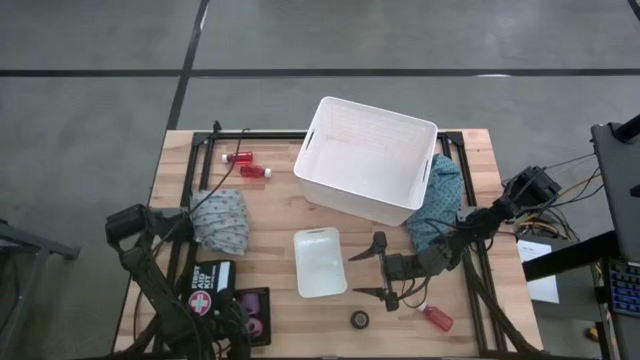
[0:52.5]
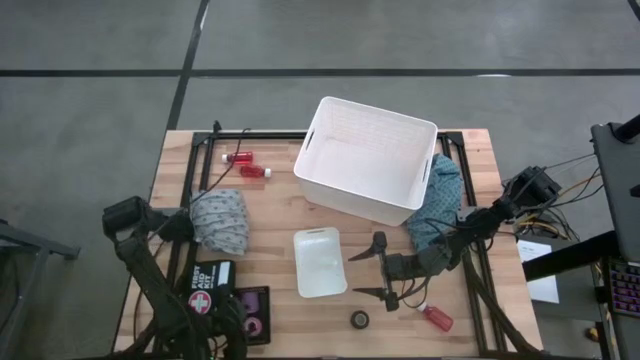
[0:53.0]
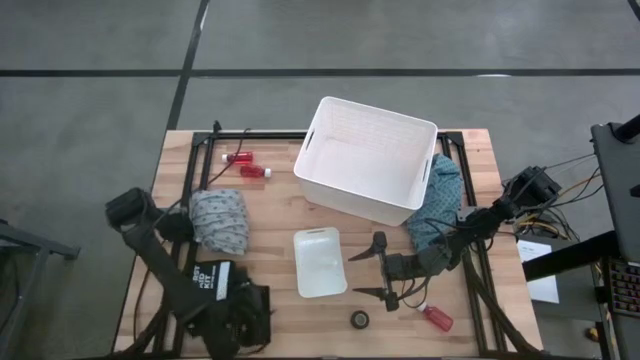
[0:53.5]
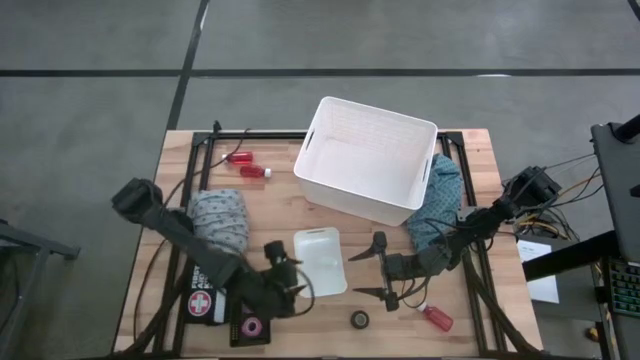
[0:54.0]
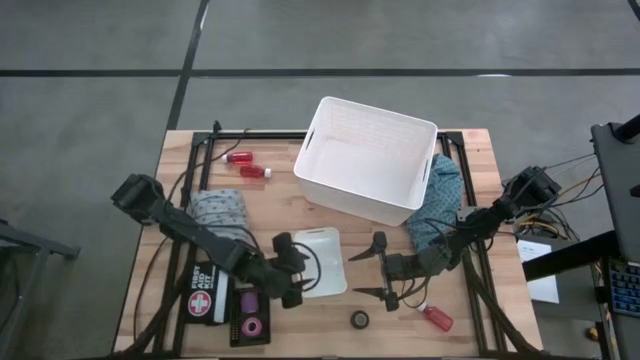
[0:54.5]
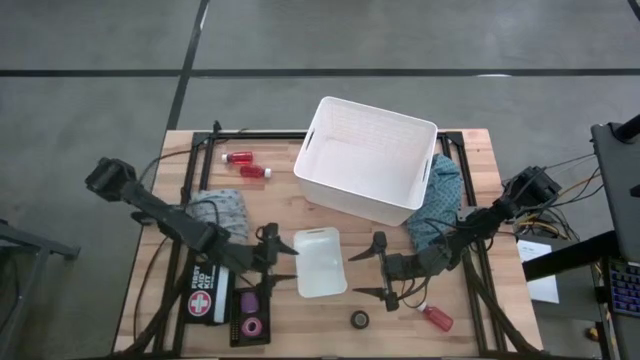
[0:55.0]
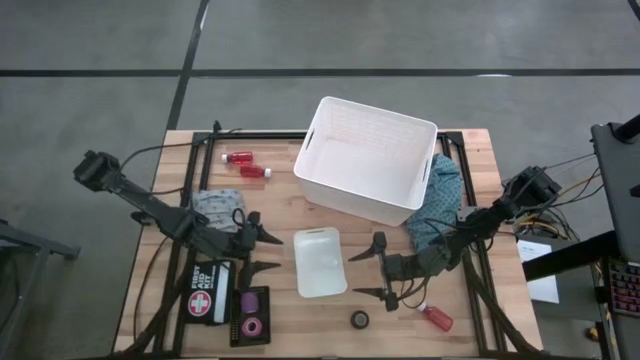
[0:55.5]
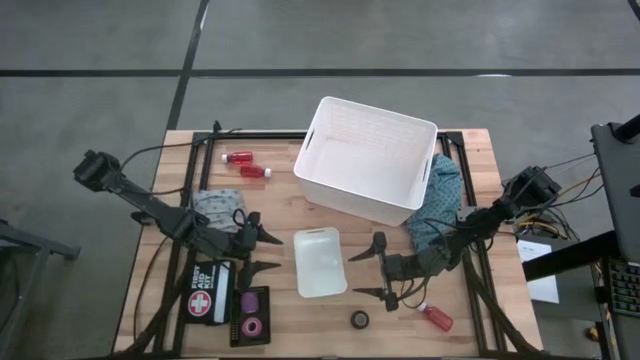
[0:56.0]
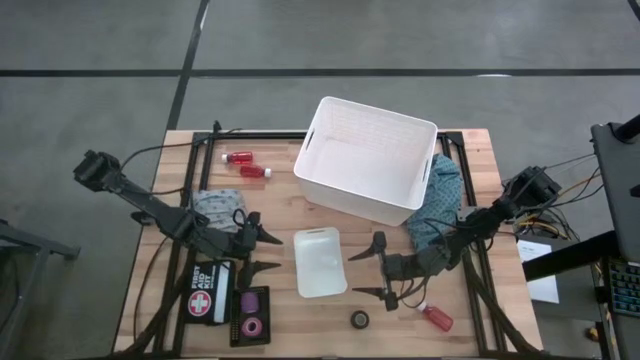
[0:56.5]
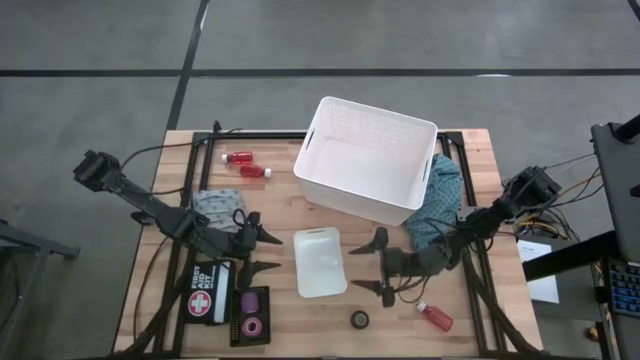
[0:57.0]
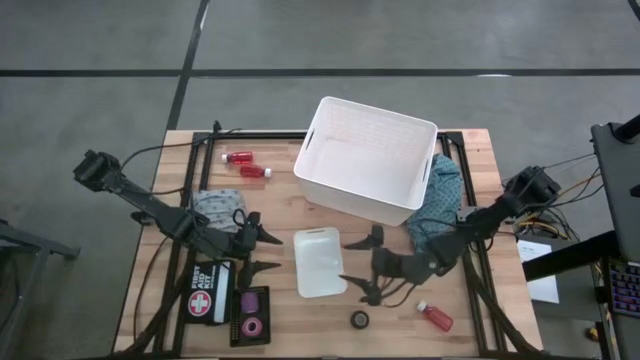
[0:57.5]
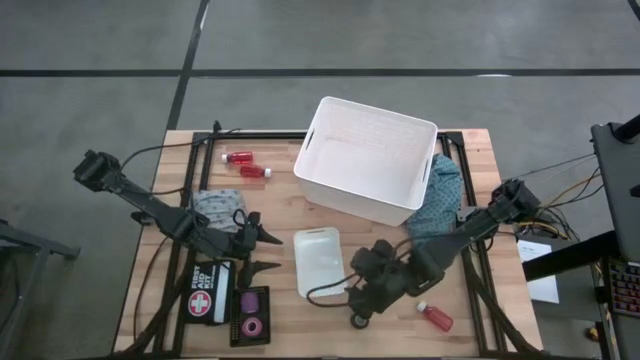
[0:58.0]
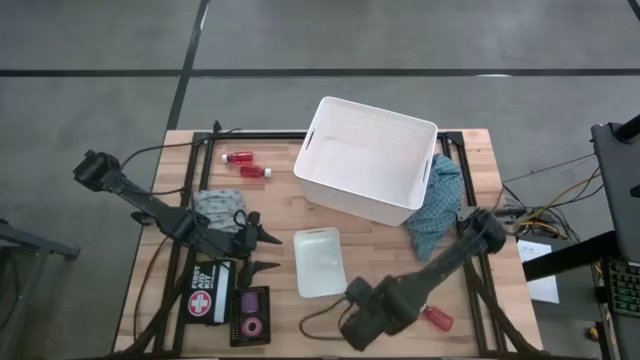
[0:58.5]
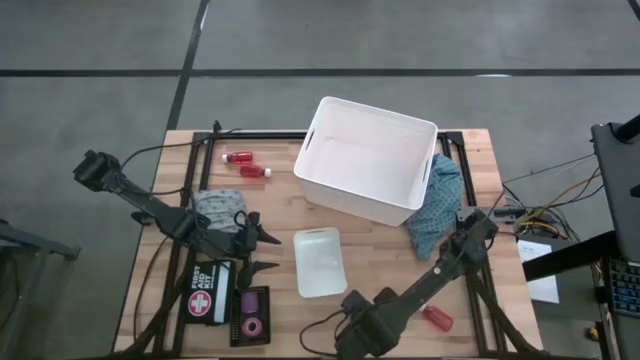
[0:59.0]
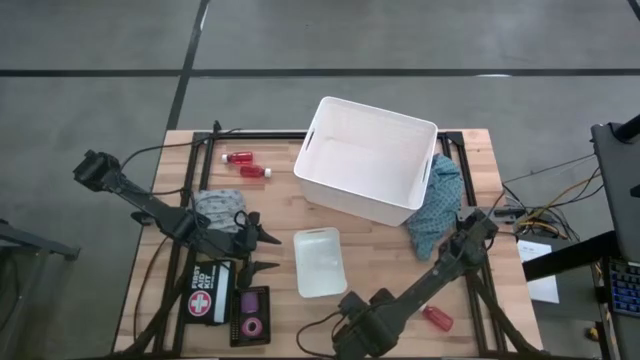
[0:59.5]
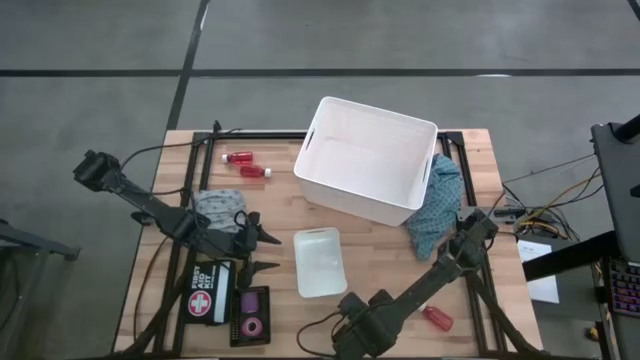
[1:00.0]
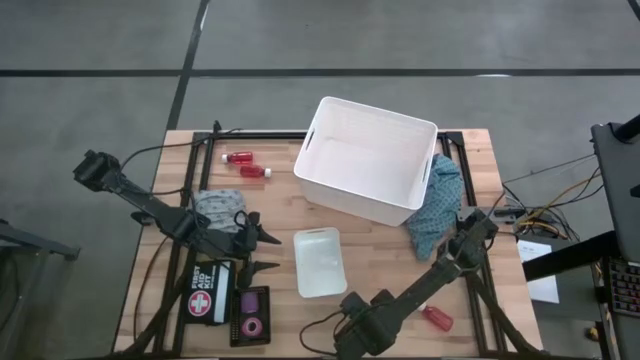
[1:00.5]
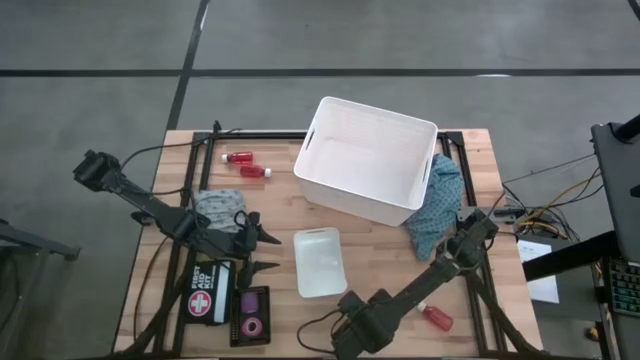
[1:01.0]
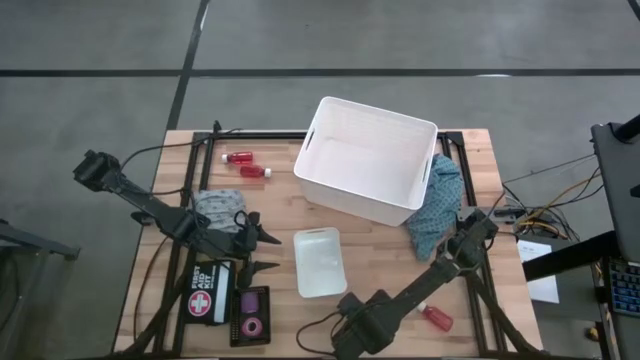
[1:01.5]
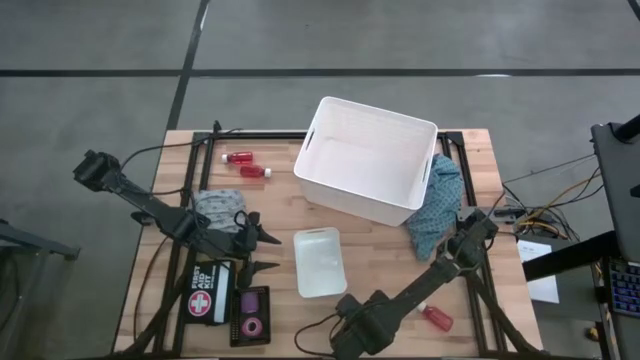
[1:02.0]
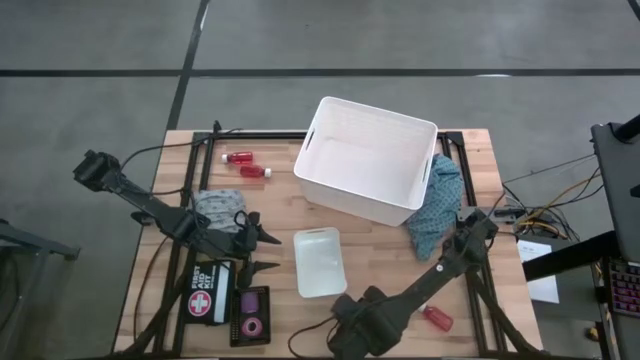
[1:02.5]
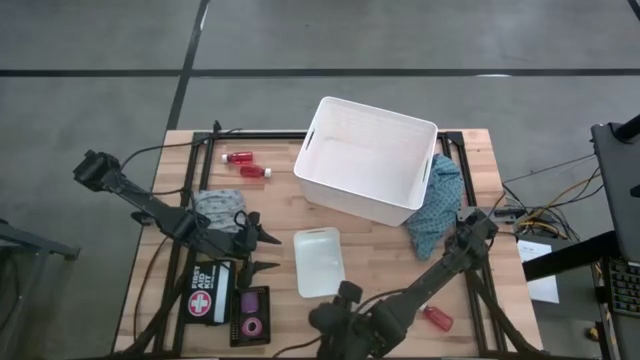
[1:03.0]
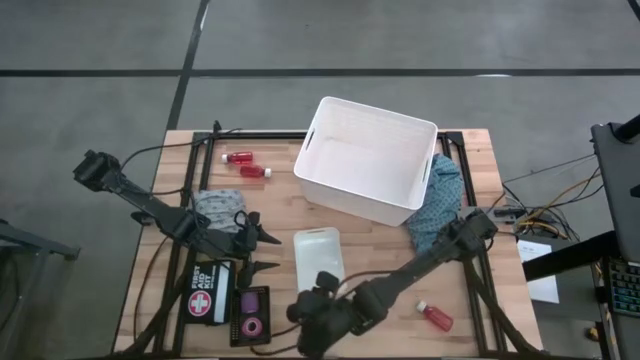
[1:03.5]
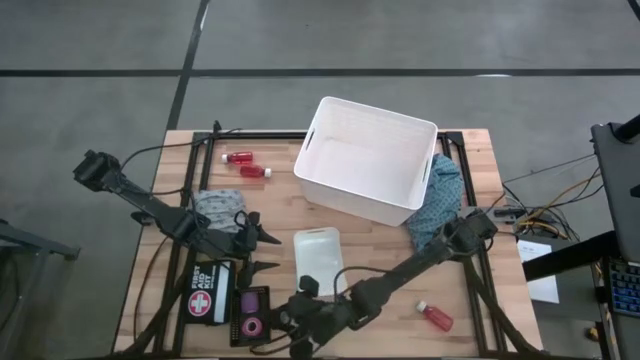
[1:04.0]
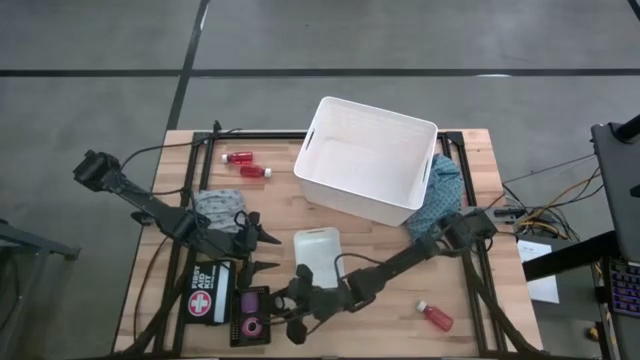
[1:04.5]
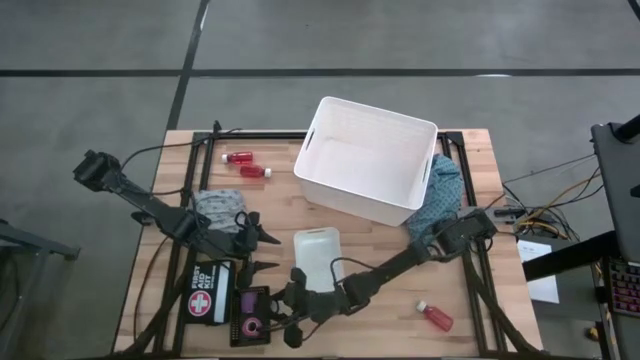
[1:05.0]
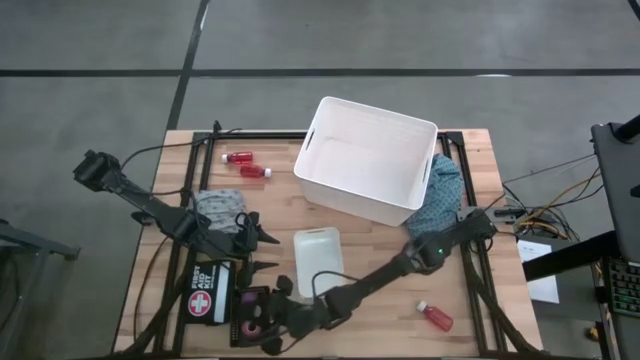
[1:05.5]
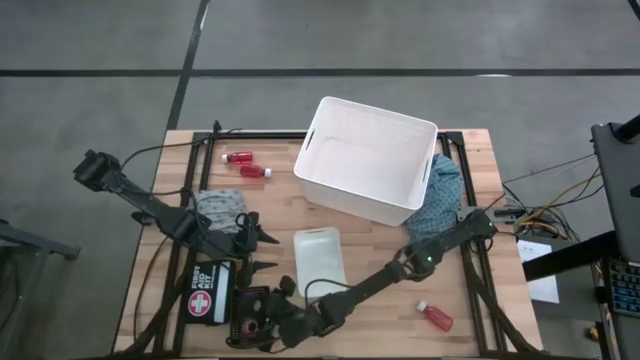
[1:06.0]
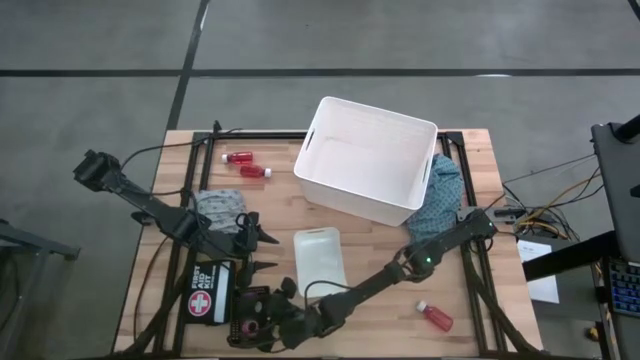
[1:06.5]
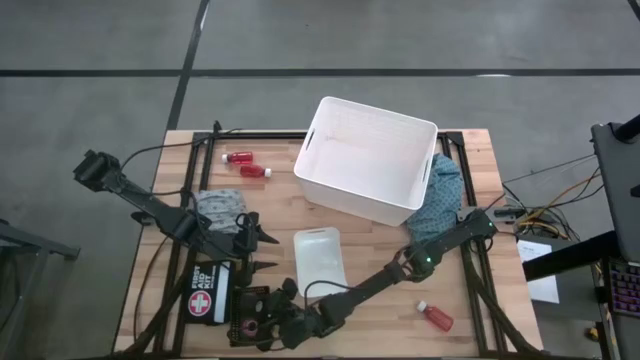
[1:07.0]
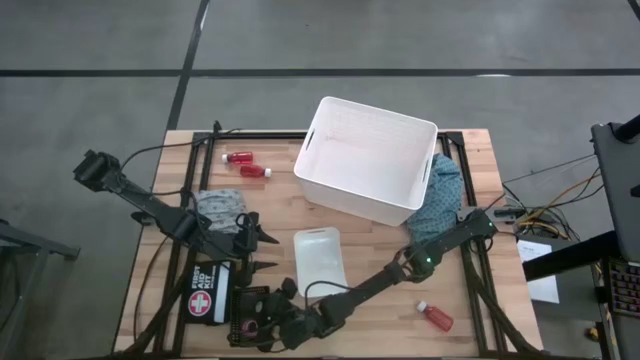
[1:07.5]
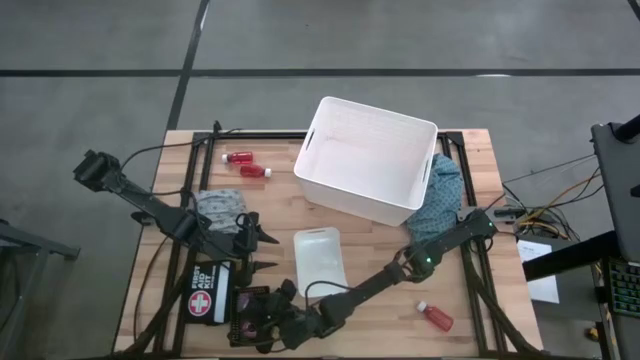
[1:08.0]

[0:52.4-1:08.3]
Task: Pick & Place Medicine items
Put the black bandage into the black bin

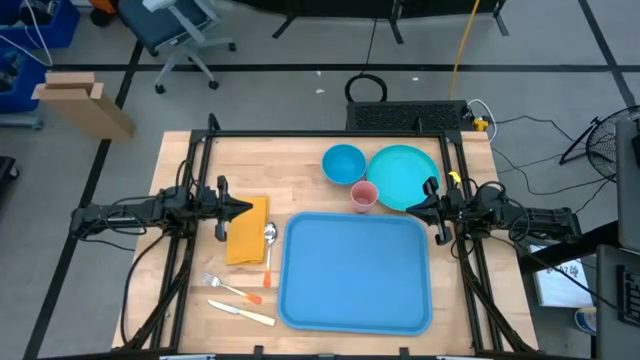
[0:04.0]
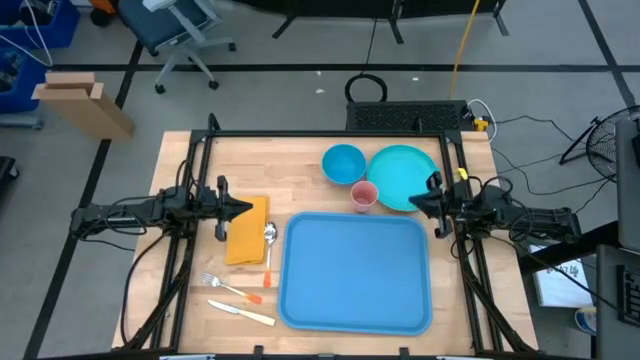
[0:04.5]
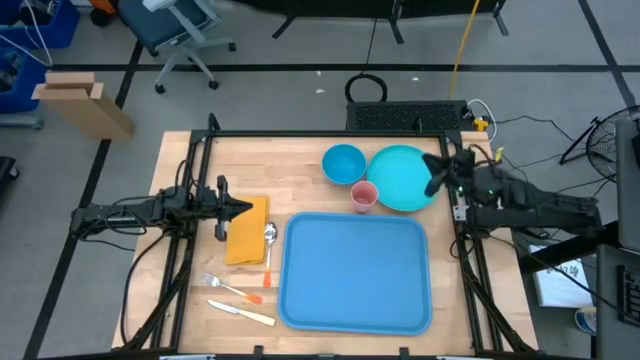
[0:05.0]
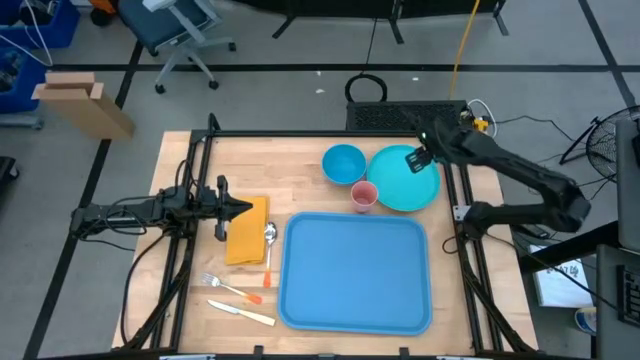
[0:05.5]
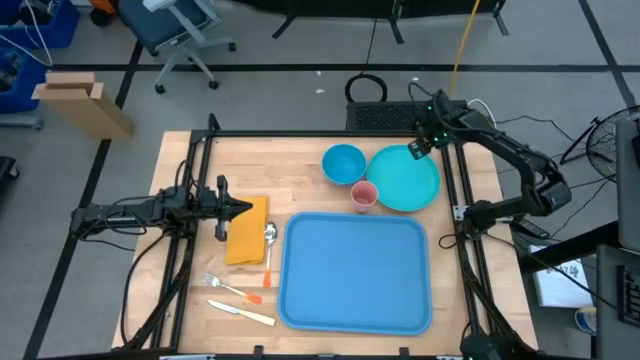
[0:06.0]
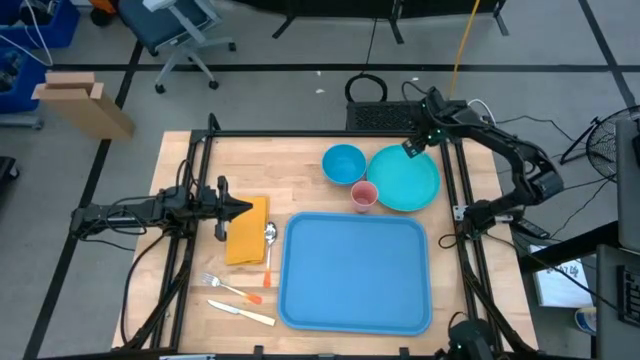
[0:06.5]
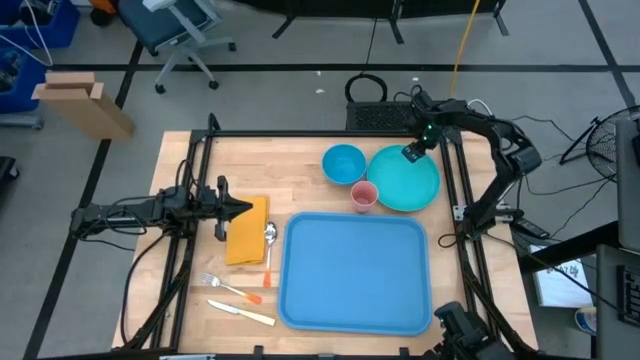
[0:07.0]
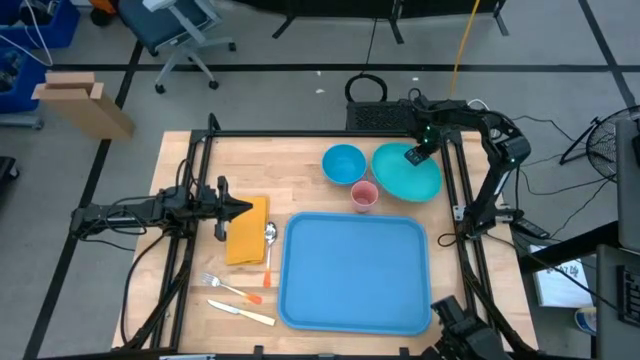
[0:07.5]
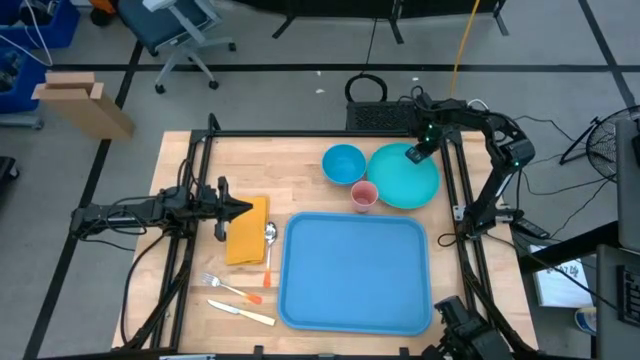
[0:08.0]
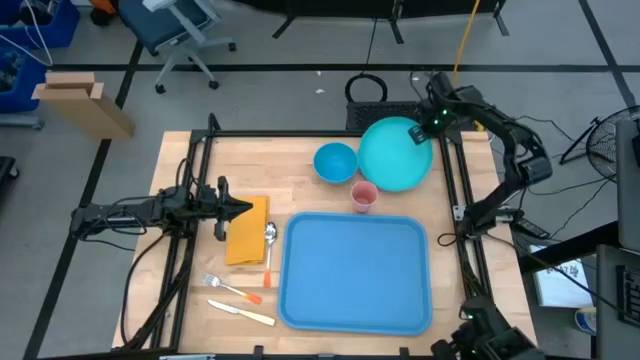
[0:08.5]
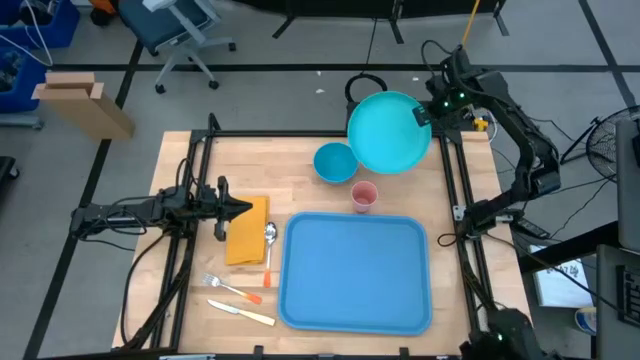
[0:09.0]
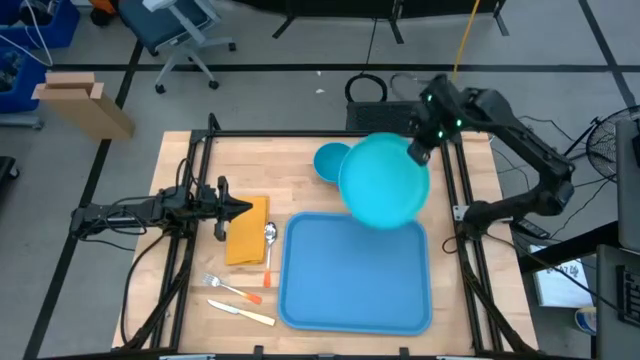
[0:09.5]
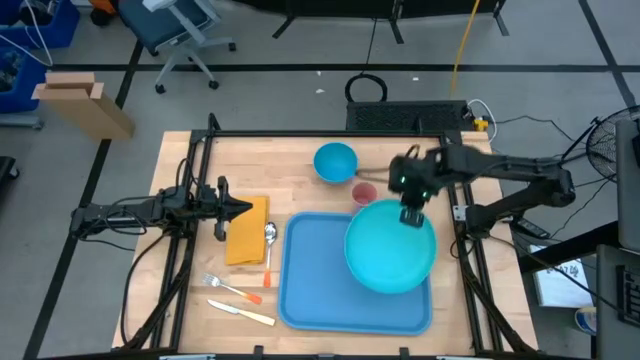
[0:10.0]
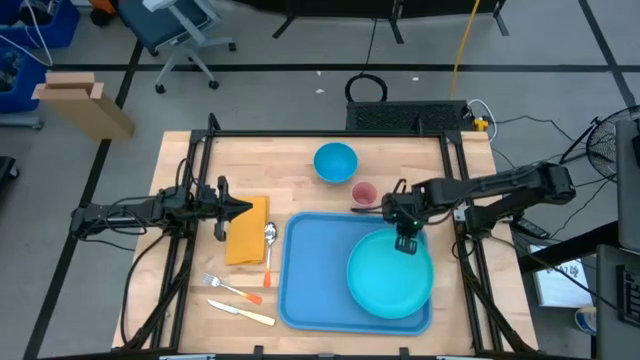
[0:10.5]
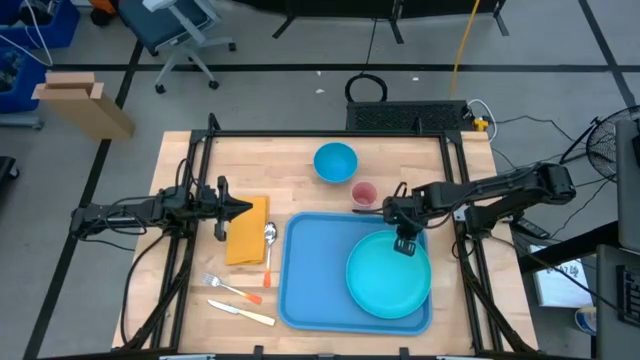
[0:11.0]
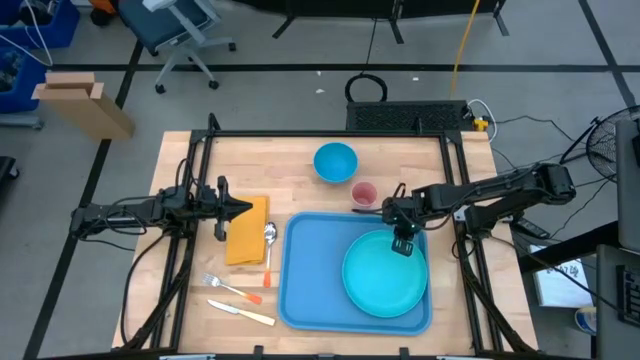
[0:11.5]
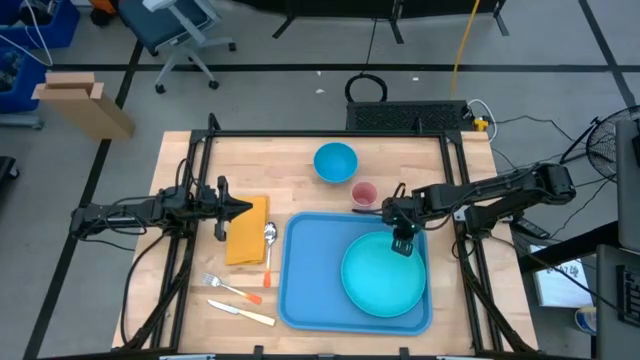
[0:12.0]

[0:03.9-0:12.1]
Task: Set up tray
Put the light green plate on the light blue tray
